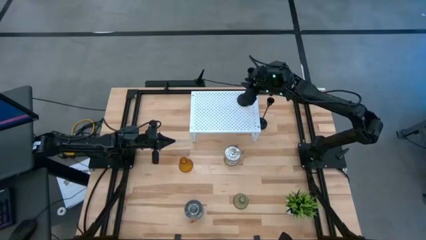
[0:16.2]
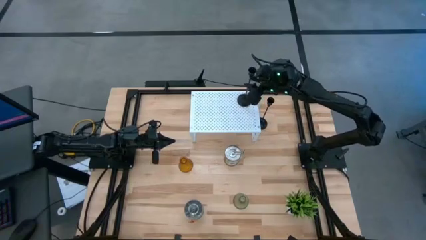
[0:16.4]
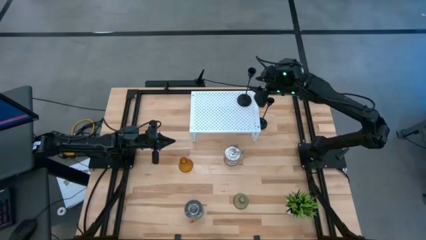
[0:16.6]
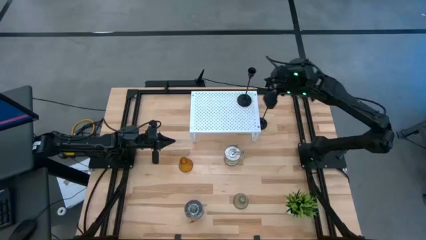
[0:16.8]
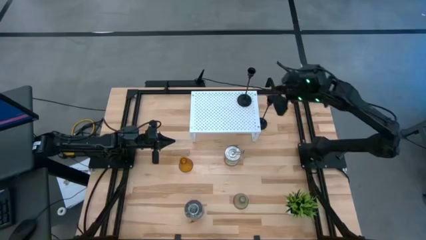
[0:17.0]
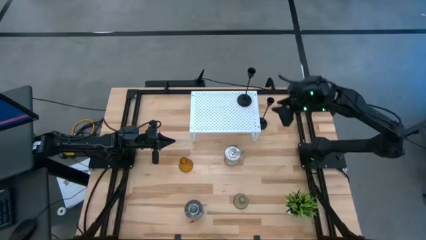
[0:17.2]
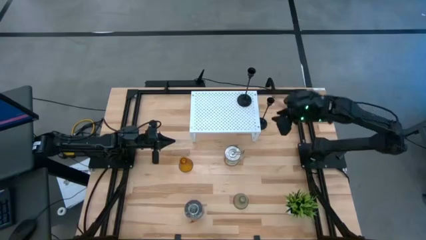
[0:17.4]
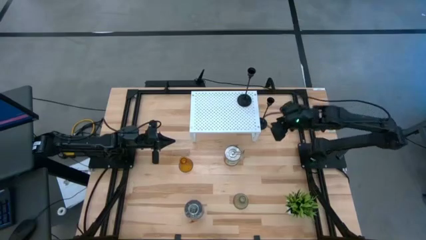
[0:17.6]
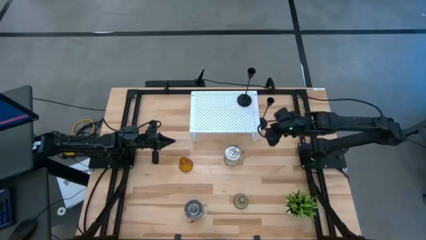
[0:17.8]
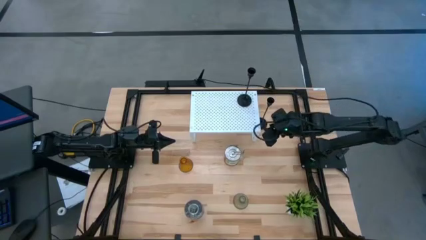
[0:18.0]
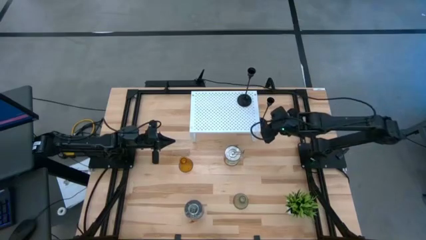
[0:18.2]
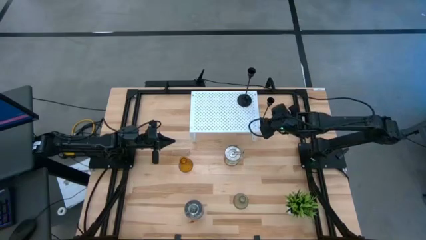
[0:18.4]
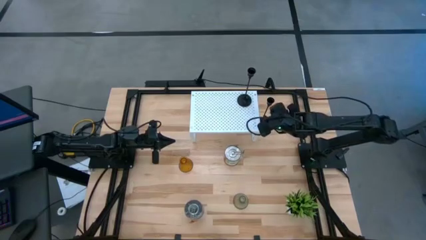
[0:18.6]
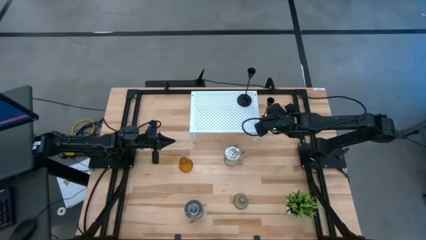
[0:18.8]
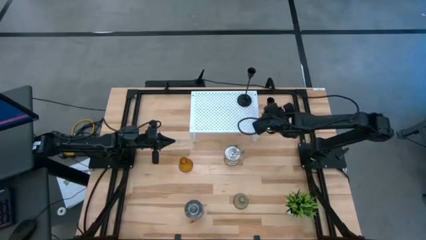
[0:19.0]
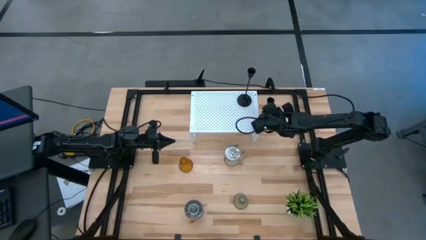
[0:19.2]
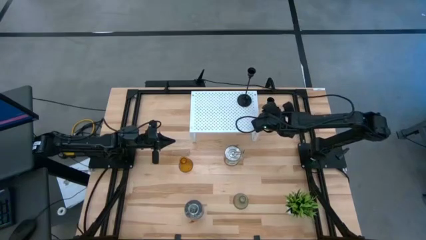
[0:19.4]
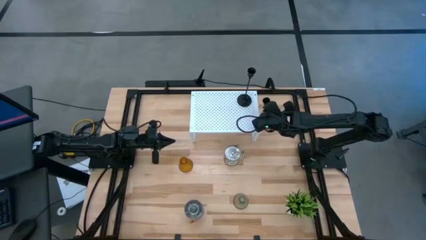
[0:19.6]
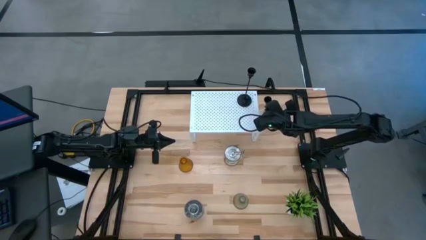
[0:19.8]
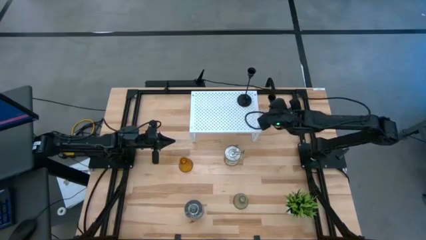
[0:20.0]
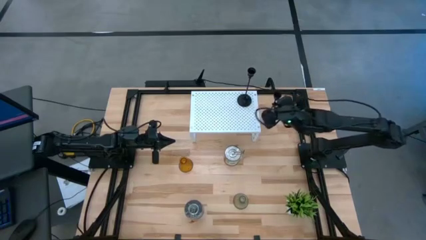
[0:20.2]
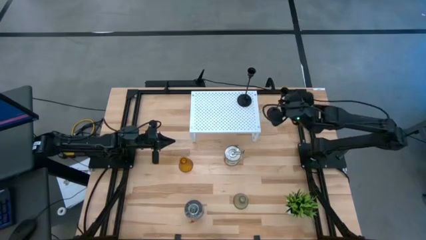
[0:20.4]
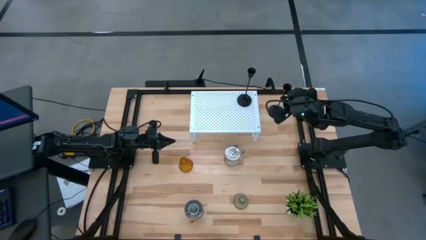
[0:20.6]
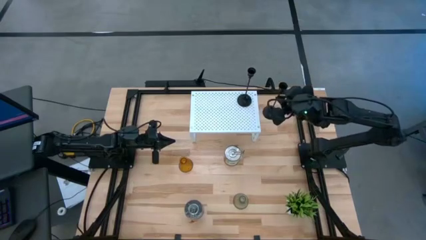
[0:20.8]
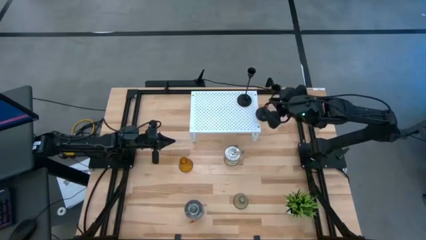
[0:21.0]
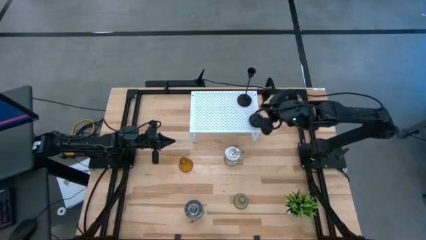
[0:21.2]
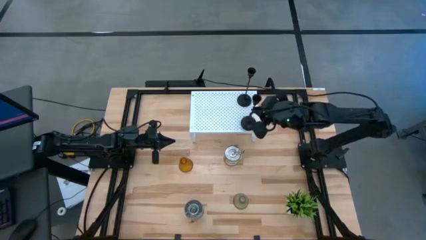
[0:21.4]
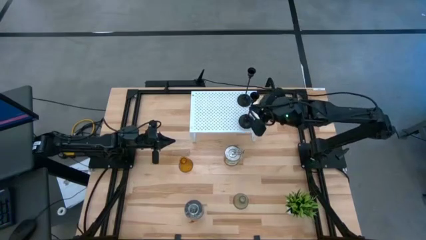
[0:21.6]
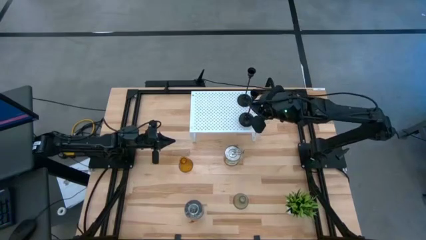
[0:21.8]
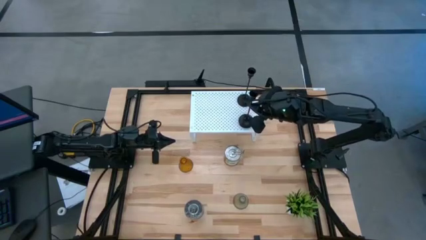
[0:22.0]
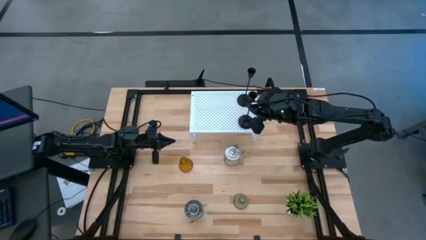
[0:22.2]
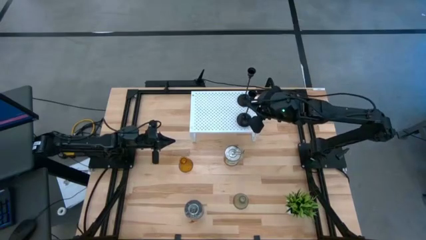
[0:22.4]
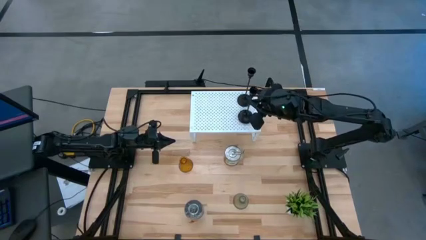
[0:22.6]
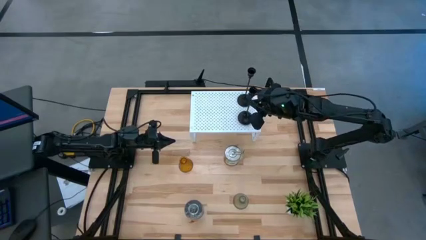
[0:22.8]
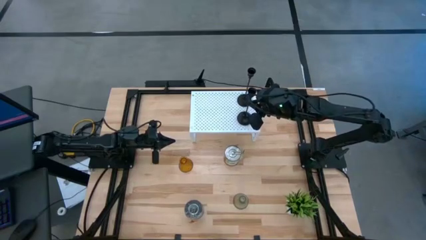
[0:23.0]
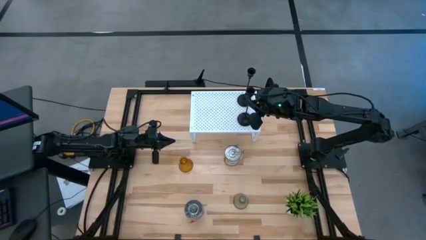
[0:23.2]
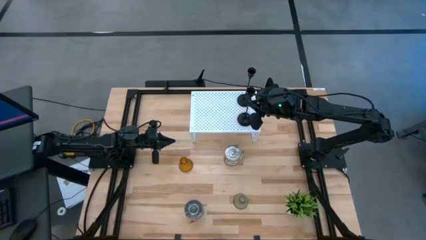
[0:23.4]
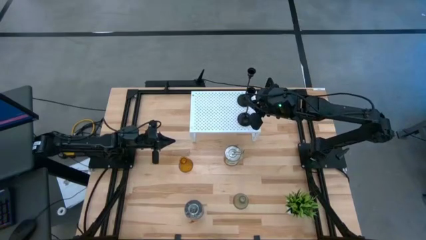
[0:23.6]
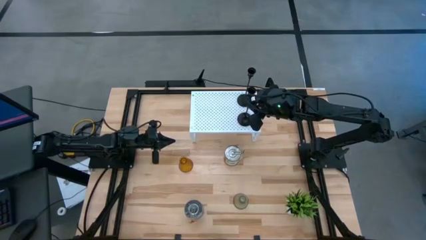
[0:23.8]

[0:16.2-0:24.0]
Task: Pick & Place candle stick holders
Put the black candle holder on the shelf align with the other black candle holder

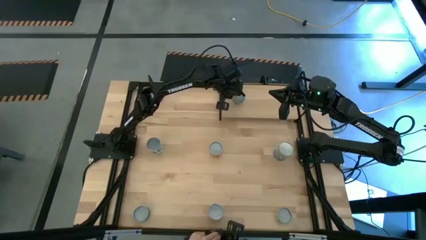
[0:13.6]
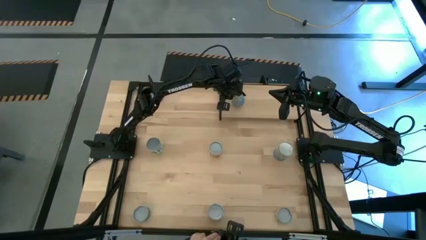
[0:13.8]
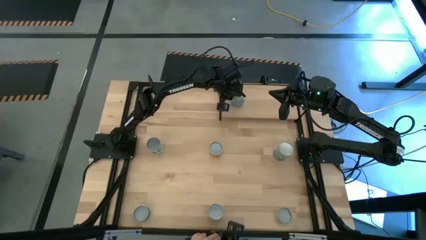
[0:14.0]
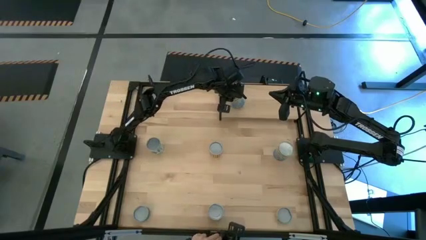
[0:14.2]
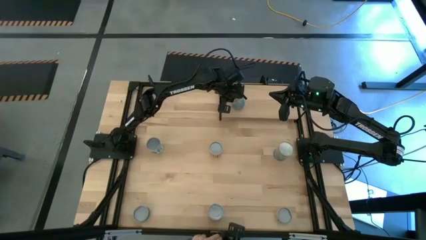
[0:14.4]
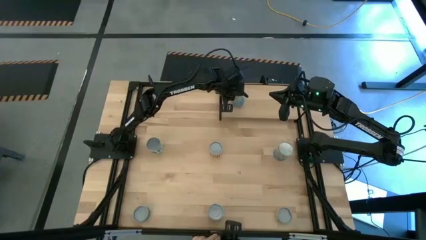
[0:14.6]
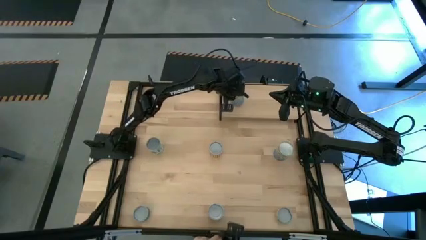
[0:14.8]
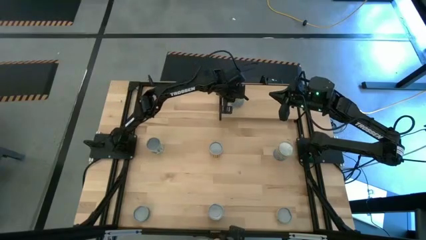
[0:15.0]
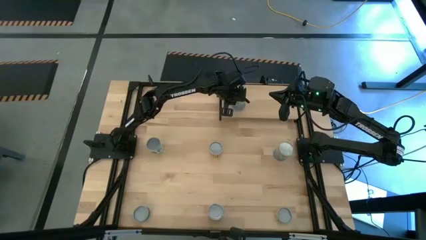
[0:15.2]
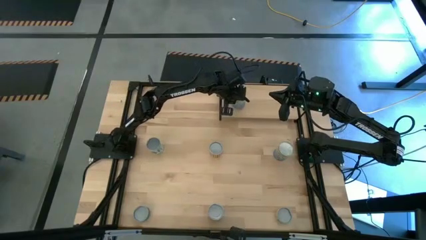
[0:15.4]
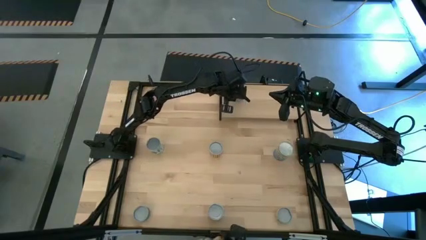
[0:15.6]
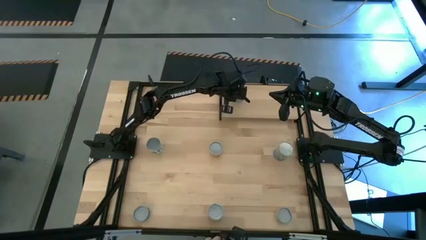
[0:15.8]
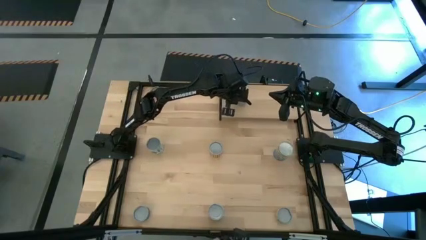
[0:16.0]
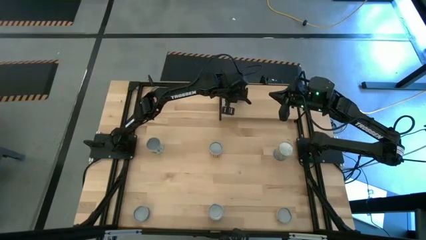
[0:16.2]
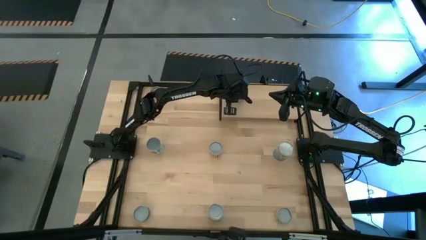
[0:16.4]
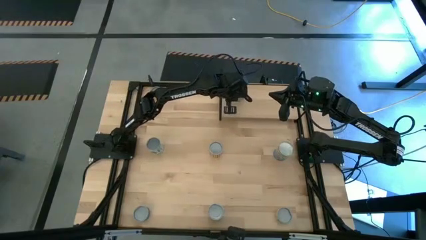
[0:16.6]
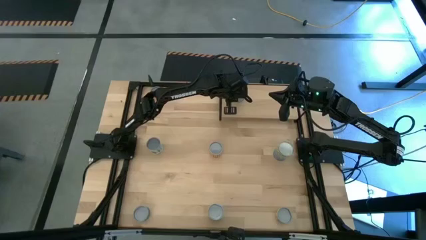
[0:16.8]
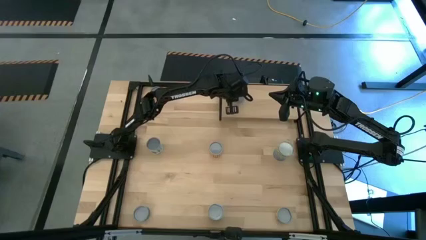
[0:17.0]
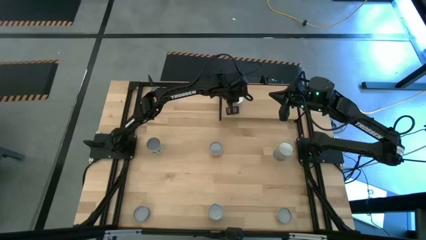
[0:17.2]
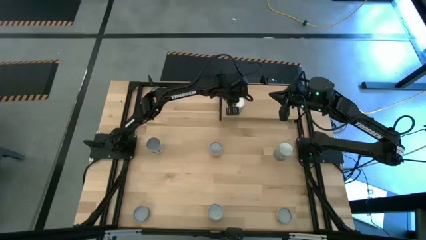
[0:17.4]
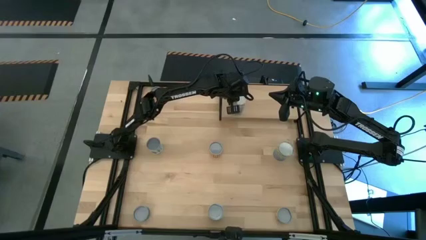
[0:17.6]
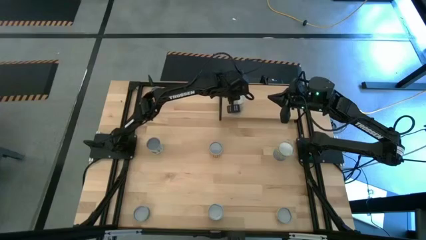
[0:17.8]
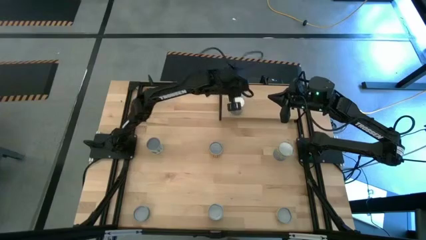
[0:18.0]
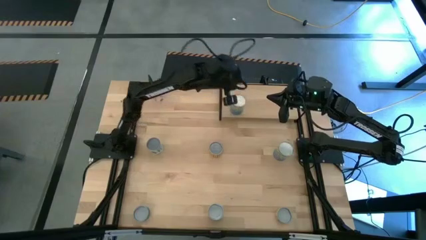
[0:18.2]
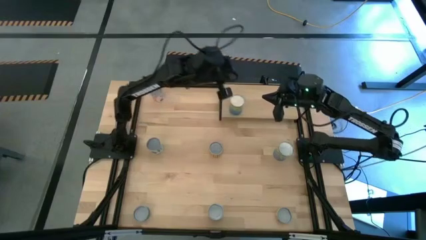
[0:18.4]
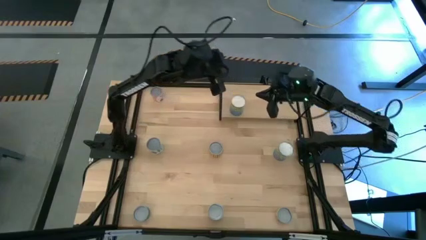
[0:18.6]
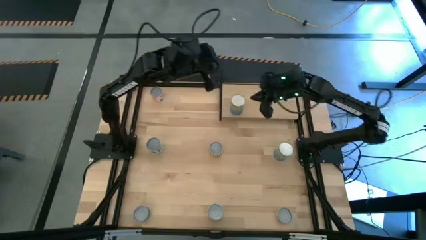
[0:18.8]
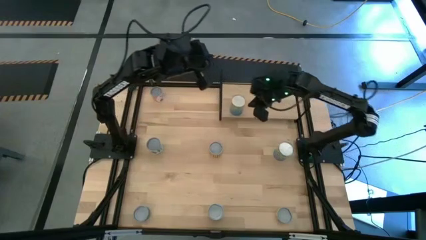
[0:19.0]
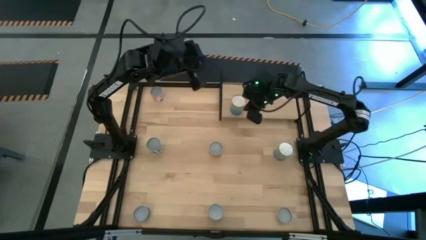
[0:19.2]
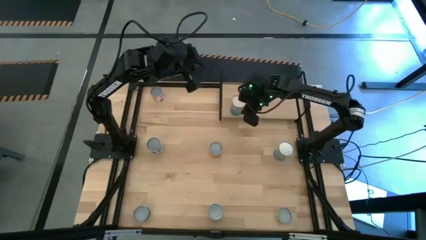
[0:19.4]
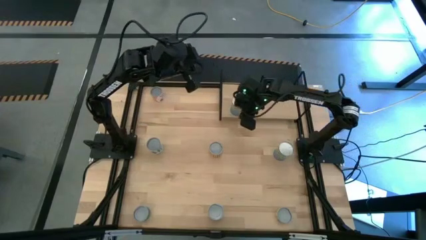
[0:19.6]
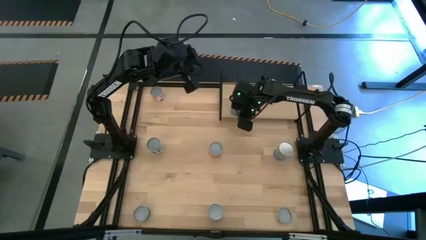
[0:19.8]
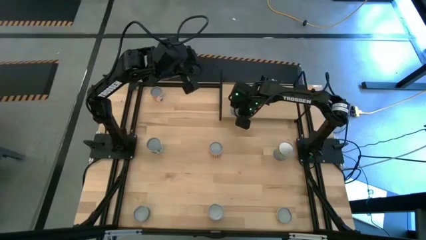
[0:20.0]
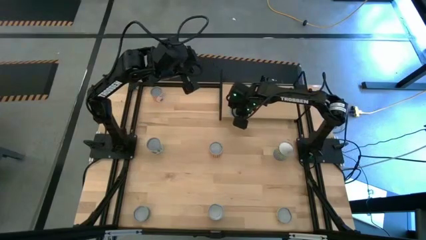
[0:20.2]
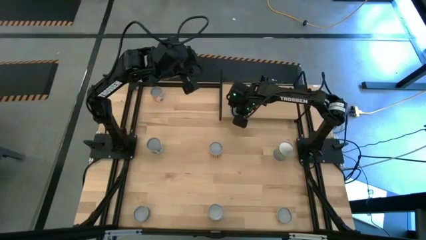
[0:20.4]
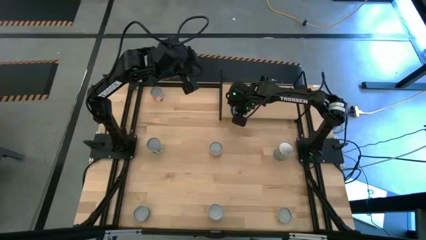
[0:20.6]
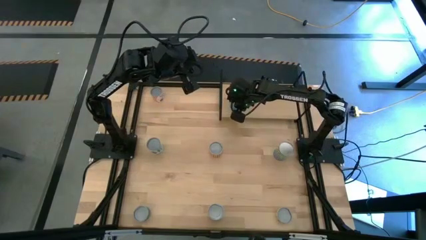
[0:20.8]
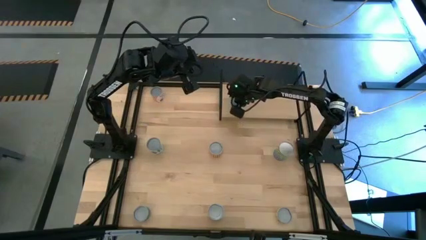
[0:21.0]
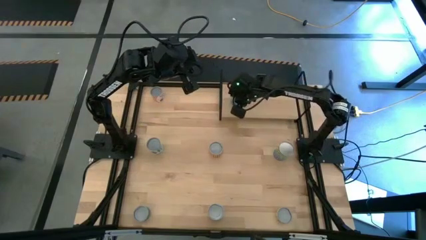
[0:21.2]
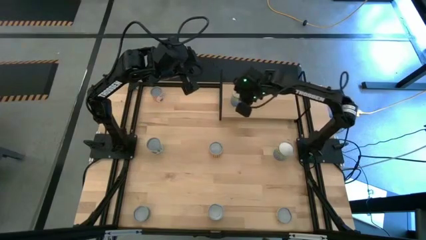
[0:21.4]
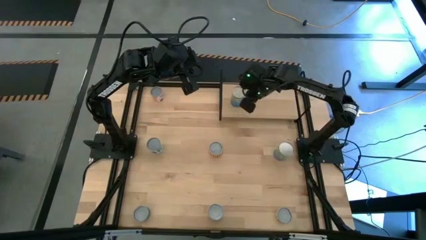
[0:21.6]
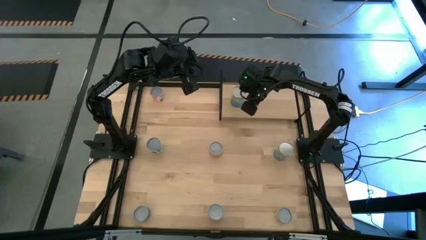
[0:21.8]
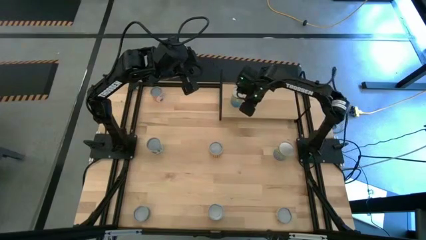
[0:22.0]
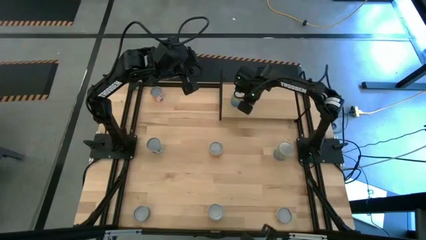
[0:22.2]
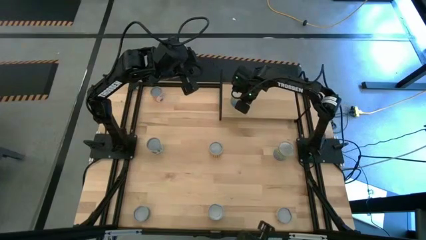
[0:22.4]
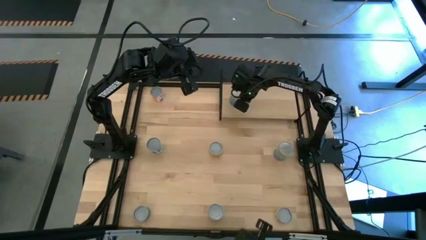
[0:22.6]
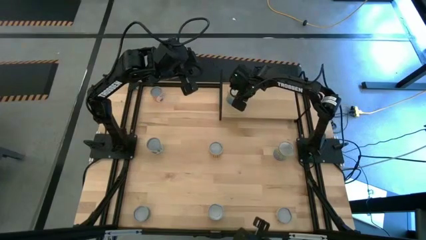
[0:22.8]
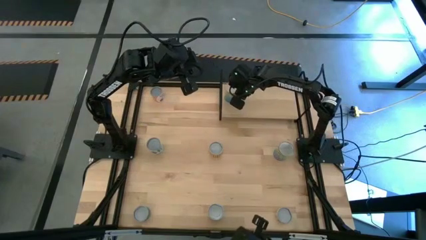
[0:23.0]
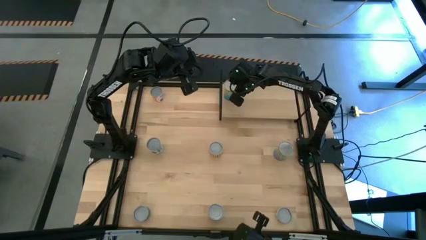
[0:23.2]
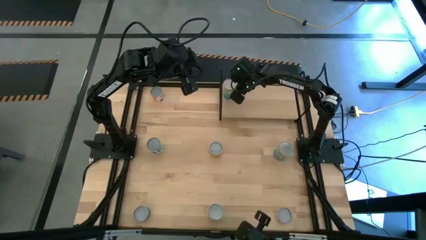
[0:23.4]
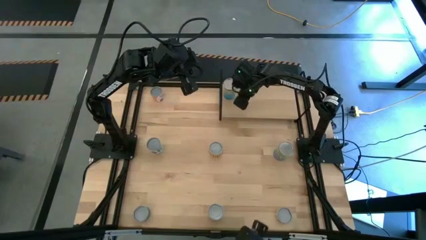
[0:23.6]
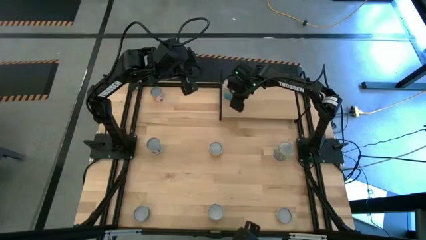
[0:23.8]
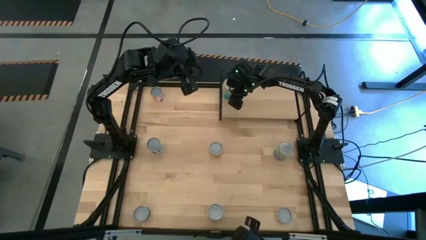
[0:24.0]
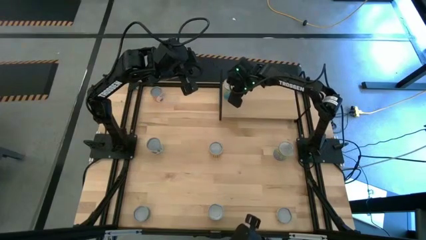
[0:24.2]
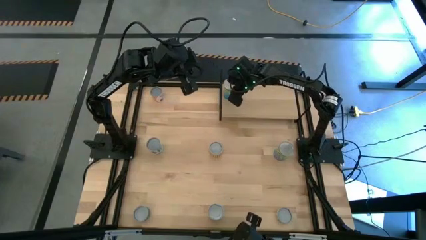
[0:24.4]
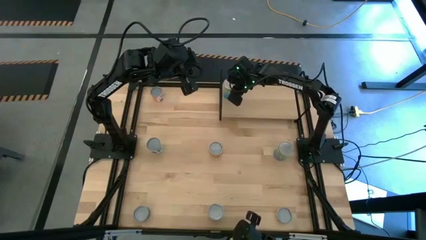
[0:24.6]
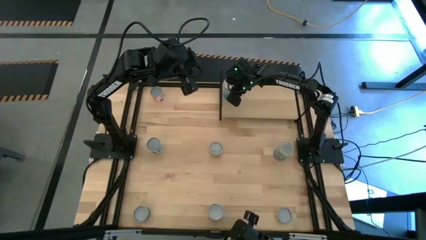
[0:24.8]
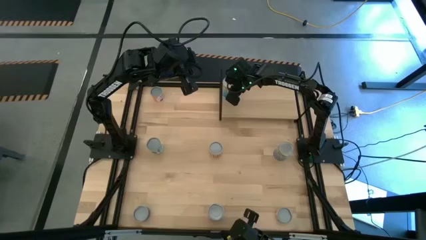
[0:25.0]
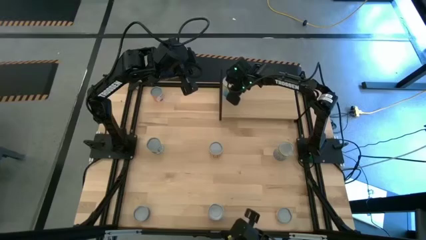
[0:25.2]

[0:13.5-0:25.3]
Task: Pick and place cans onto a shelf
Put the top canned cherries on the shelf
